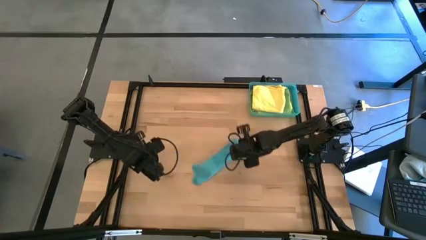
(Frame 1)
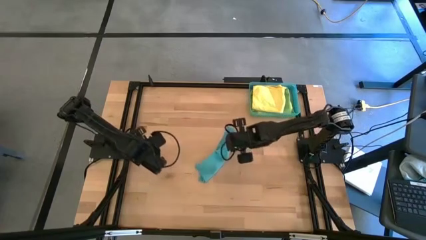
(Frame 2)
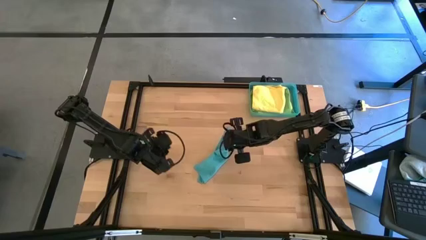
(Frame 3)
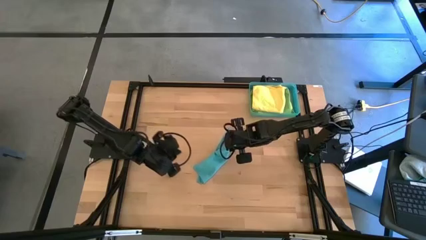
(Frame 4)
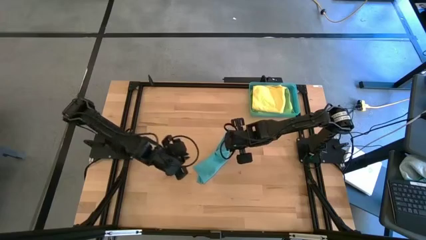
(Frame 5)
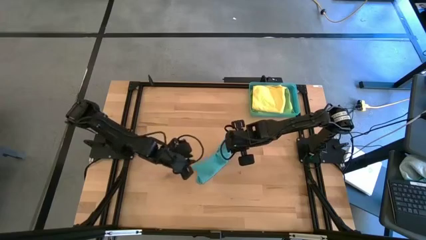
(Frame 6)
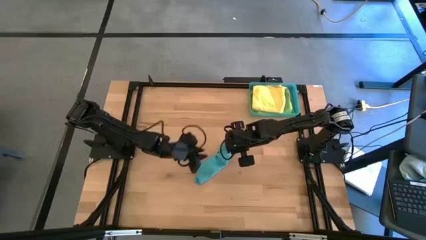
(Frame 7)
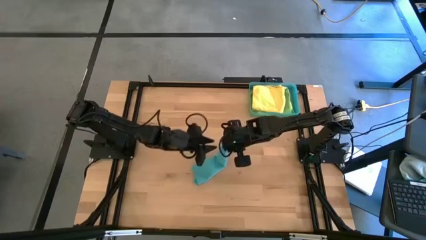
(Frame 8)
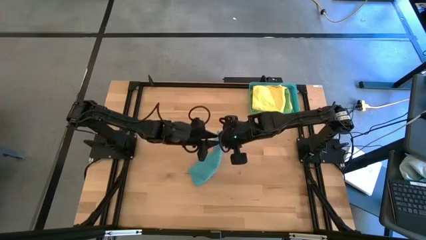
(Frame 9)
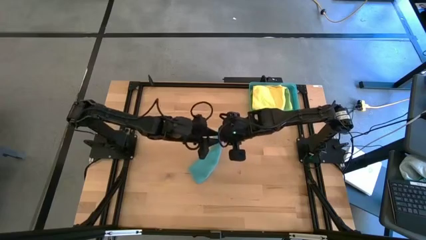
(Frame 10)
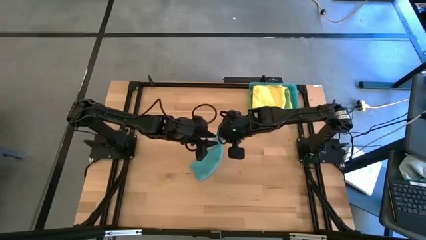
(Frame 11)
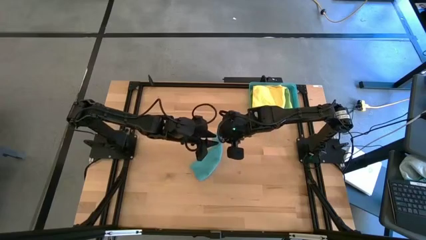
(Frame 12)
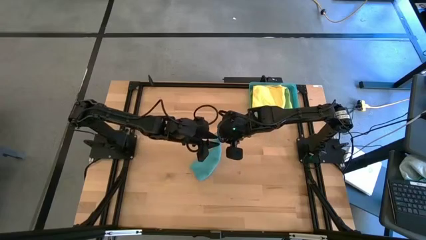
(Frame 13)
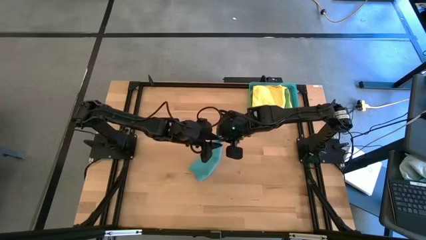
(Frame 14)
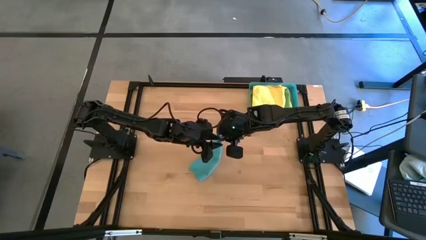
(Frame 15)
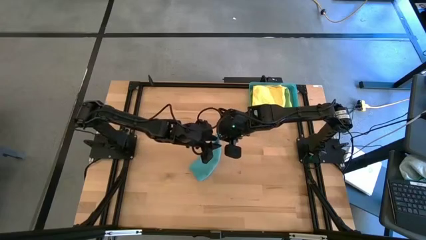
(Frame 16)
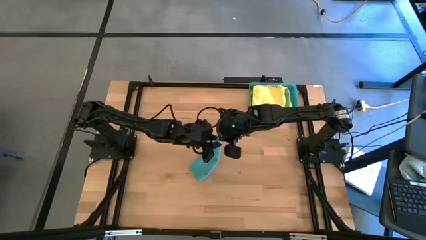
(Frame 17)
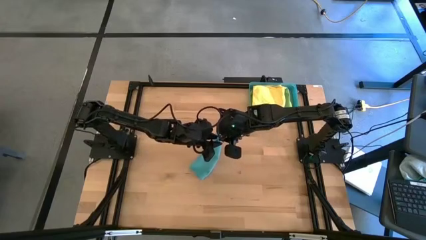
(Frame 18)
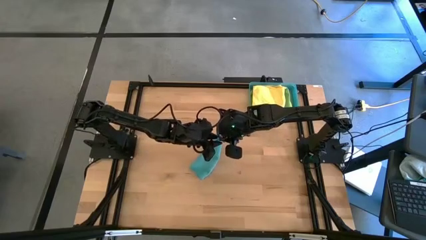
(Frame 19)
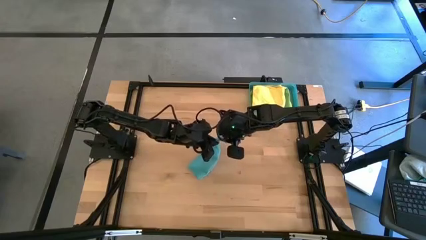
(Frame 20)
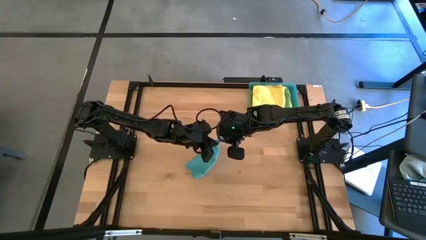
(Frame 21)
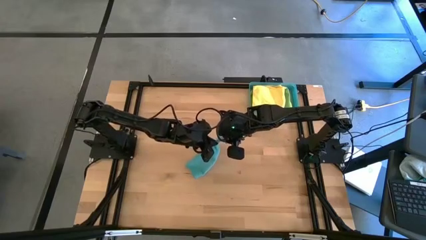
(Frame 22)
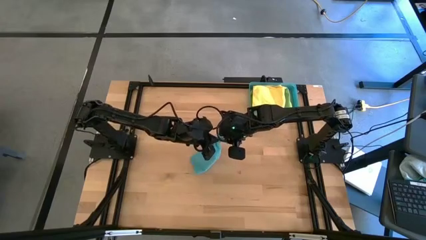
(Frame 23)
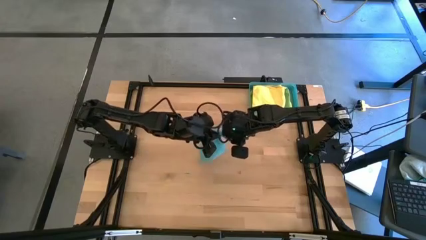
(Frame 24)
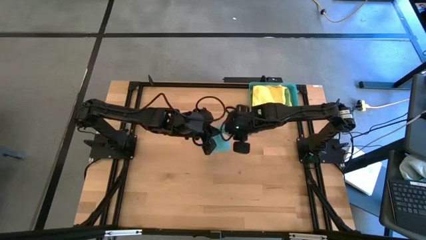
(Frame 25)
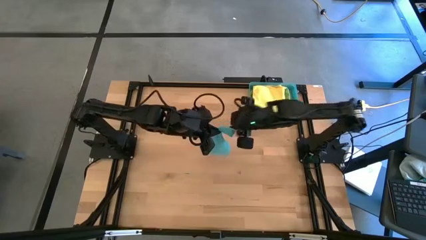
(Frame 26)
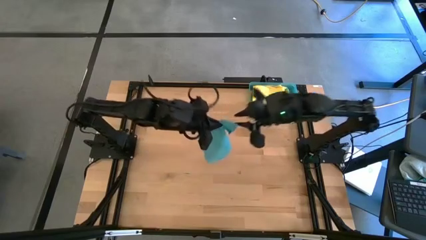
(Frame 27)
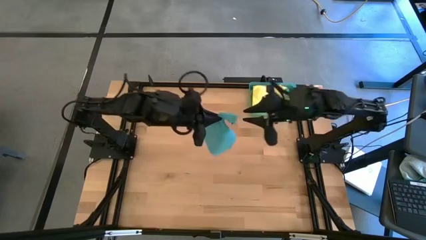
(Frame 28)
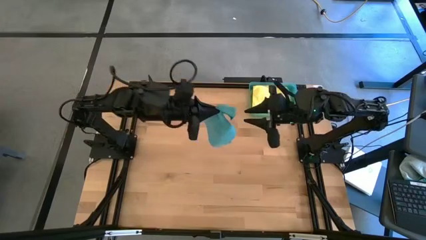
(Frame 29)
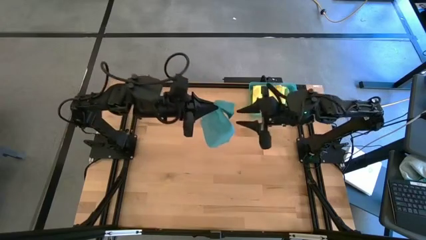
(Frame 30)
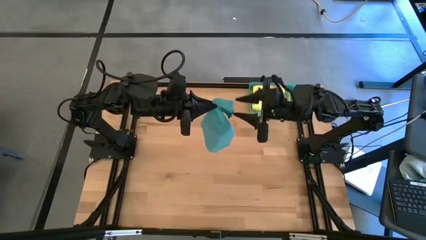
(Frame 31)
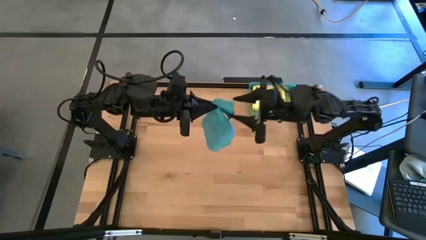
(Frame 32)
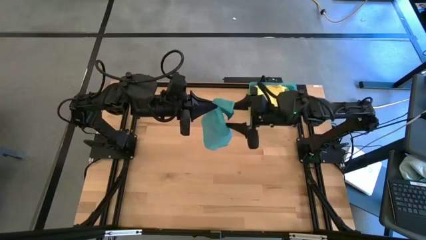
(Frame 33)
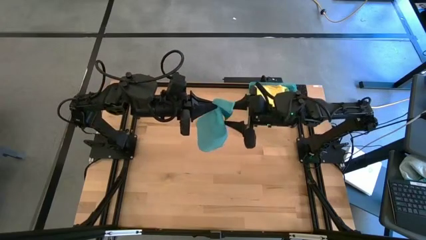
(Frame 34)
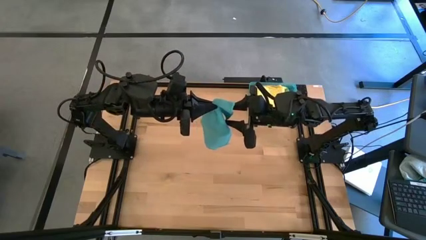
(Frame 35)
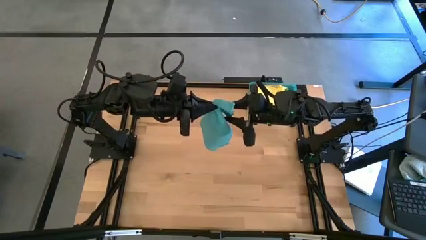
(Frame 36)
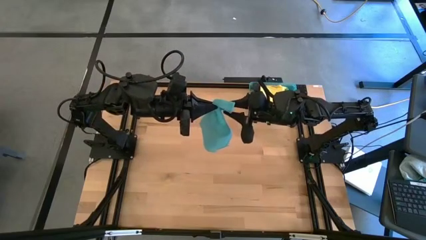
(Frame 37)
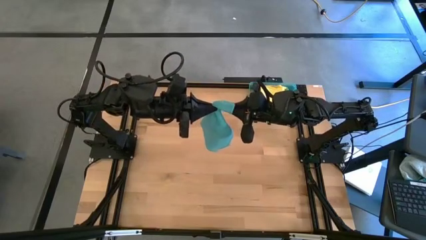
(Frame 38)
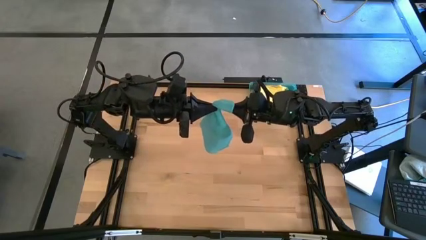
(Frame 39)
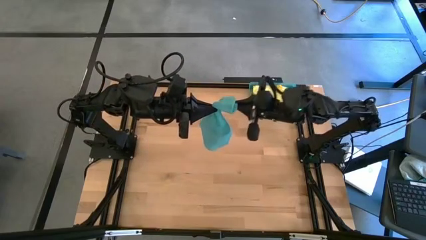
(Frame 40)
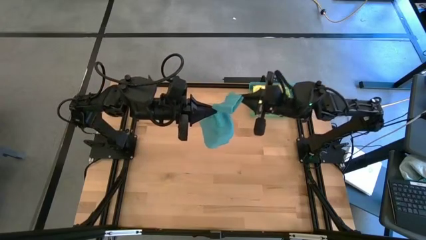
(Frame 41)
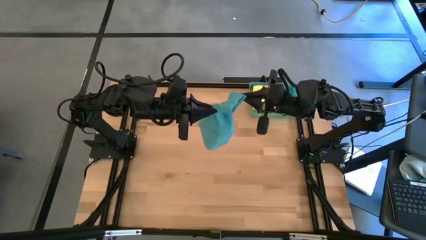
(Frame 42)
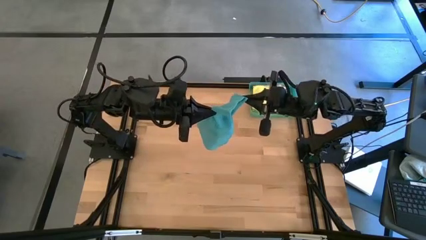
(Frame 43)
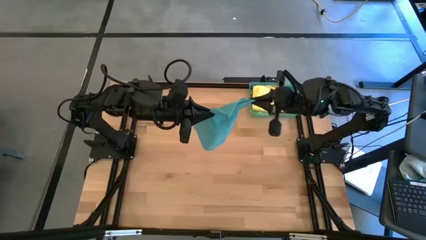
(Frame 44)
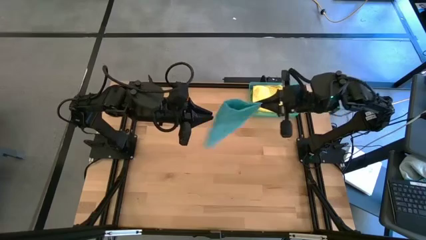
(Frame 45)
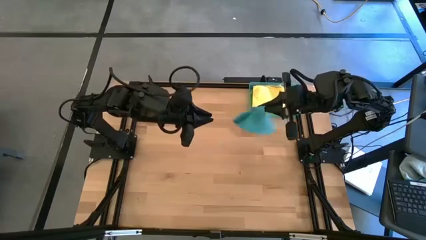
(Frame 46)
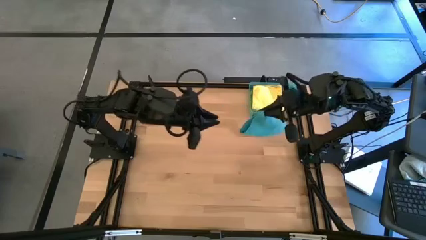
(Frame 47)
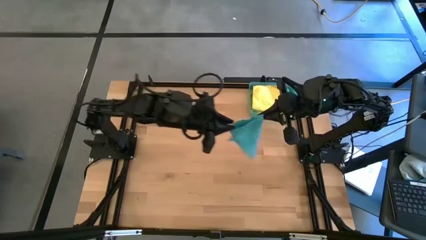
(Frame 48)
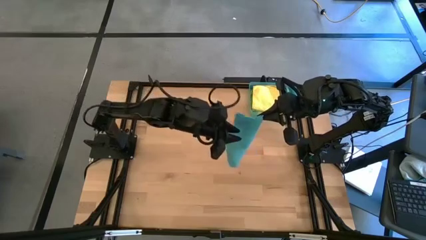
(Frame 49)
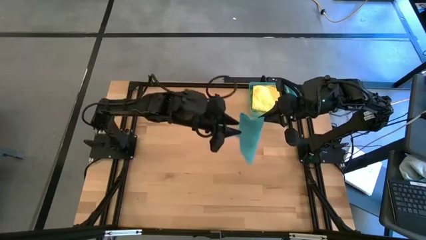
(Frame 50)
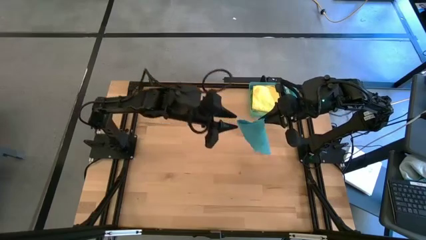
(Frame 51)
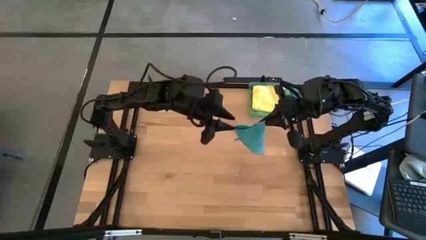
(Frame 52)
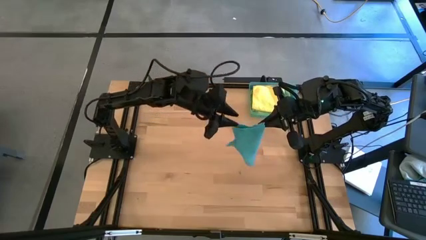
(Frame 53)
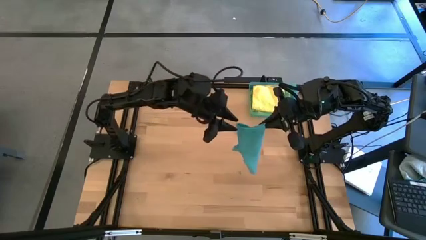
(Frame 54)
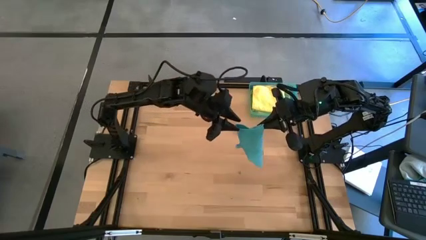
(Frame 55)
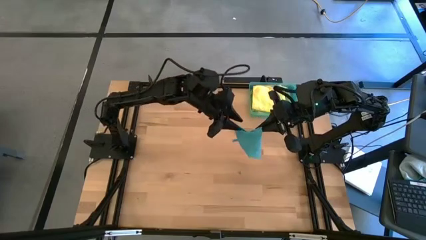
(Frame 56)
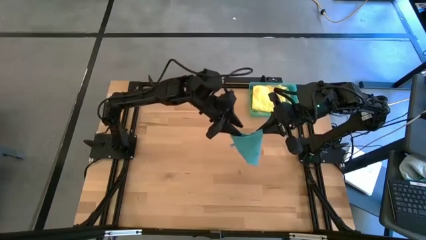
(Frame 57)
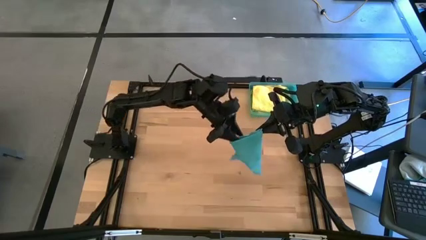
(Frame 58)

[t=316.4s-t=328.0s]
Task: Fold microfiber towels
Fold the blue microfiber cloth
